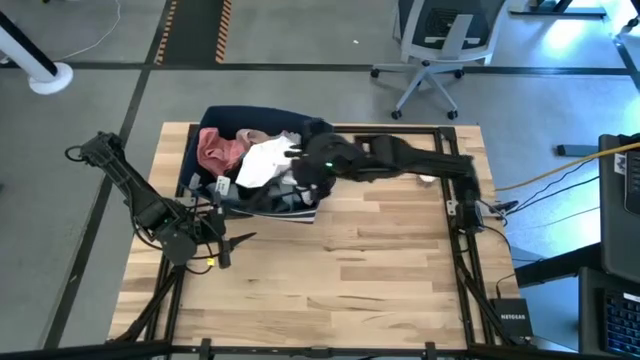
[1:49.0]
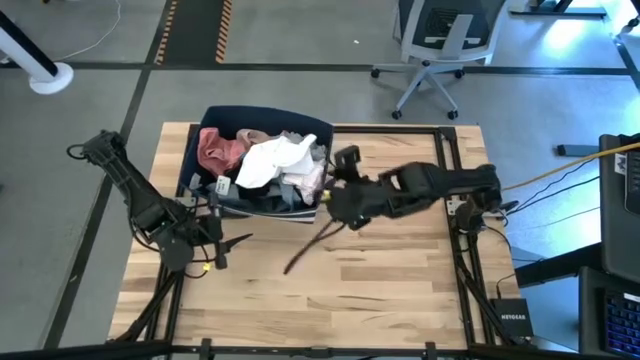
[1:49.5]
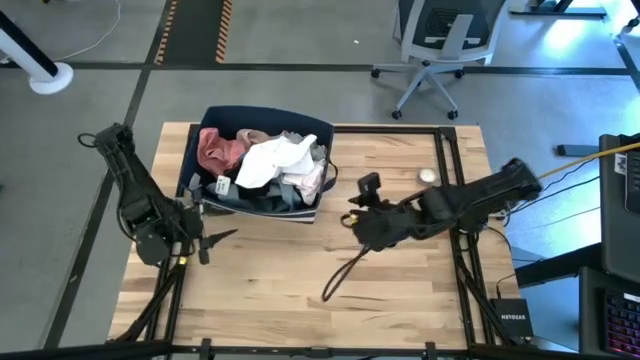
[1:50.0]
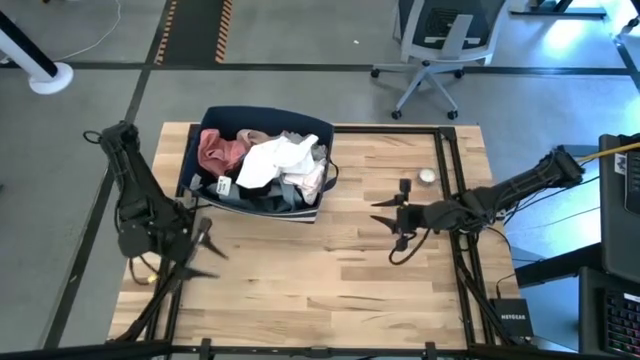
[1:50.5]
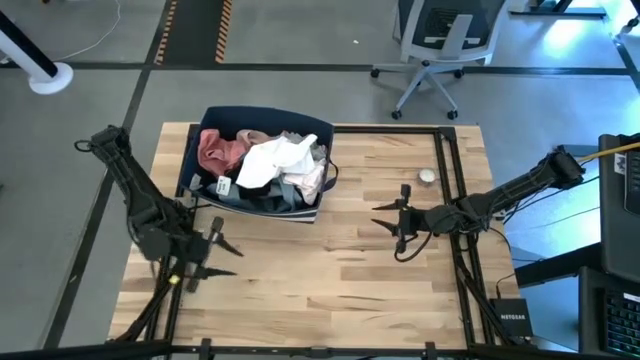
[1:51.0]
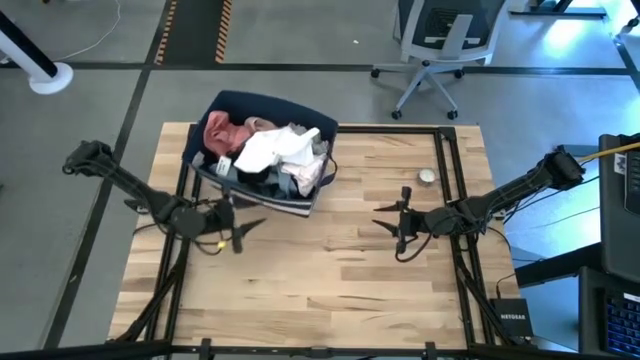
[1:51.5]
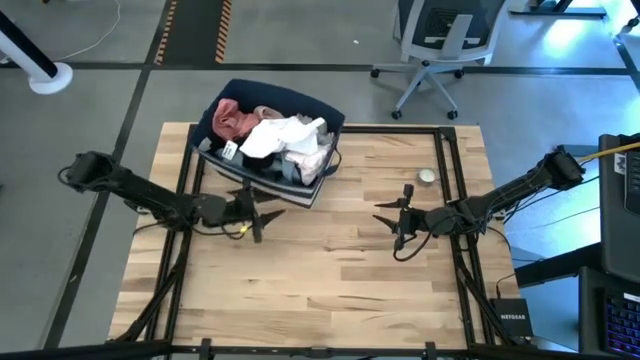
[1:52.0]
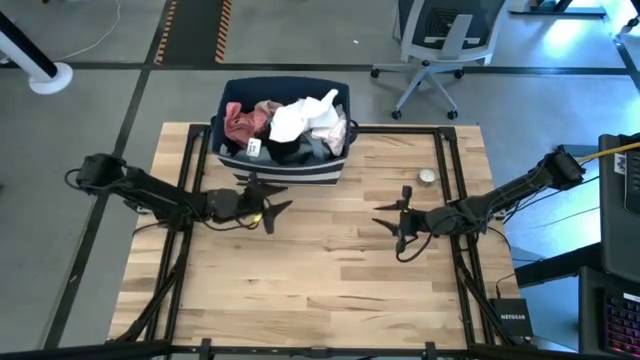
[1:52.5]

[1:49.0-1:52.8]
Task: Sort clothes
Move the blue laundry organizer to the top left

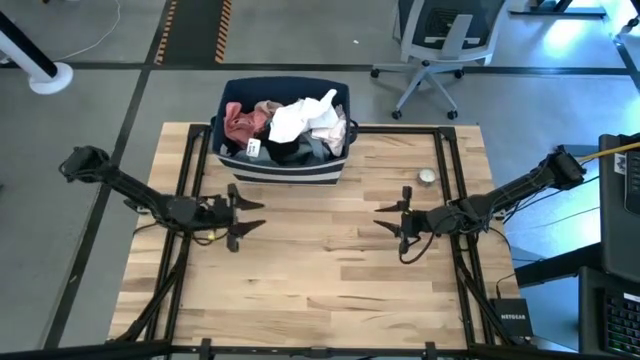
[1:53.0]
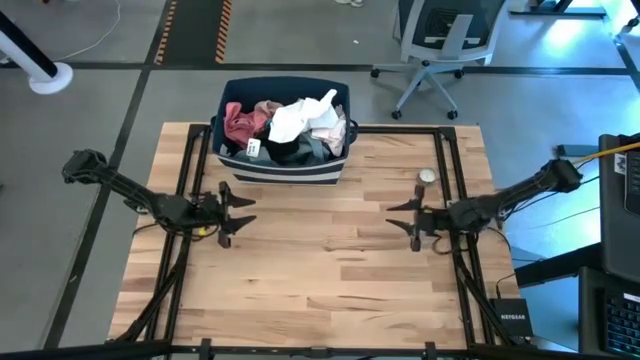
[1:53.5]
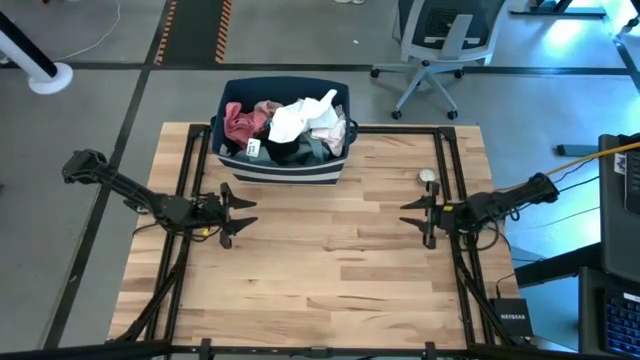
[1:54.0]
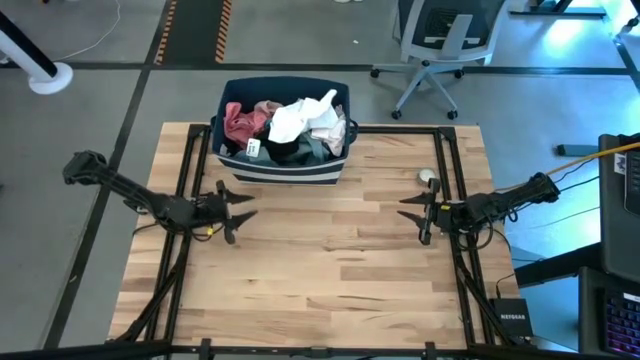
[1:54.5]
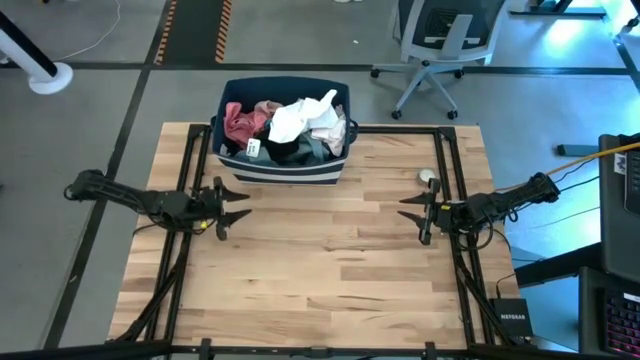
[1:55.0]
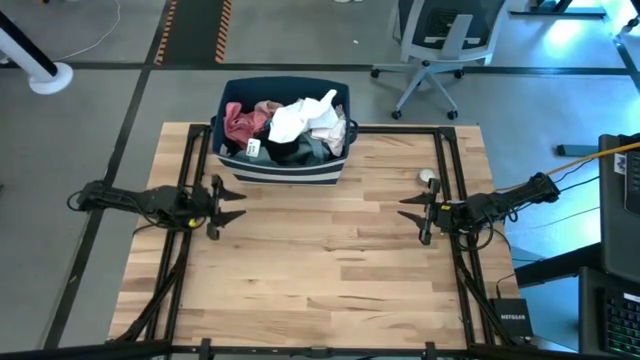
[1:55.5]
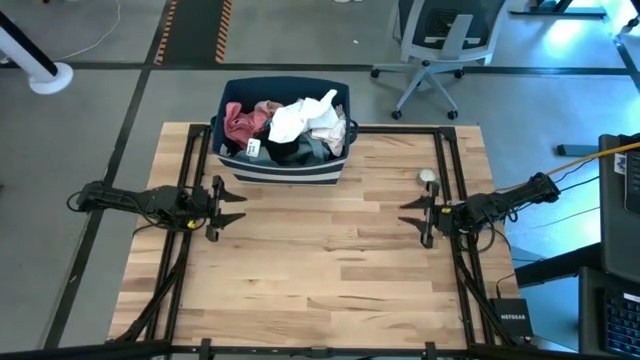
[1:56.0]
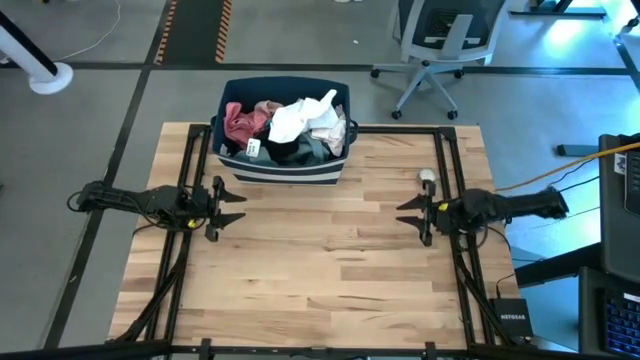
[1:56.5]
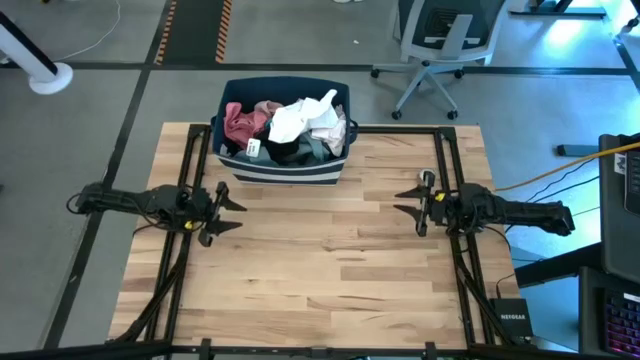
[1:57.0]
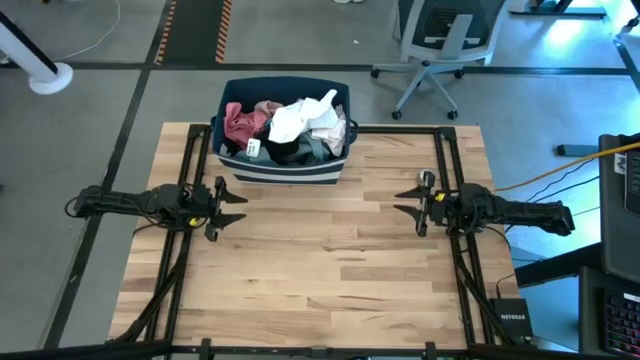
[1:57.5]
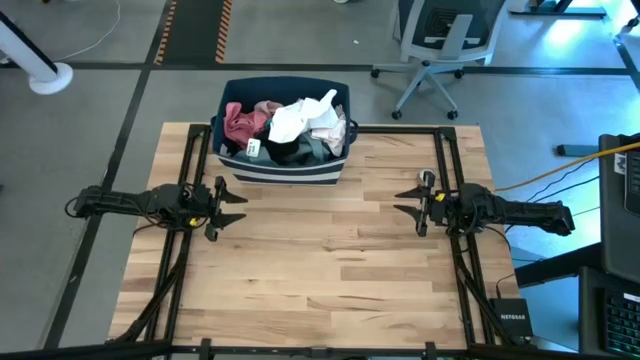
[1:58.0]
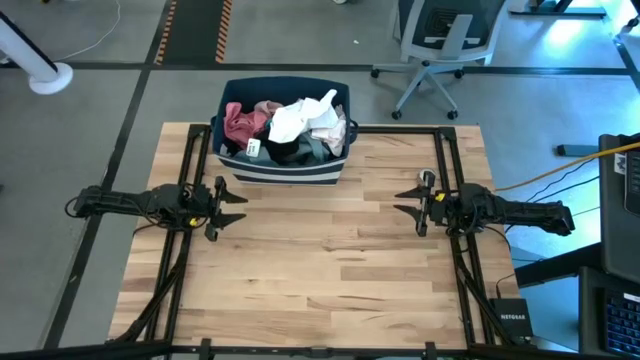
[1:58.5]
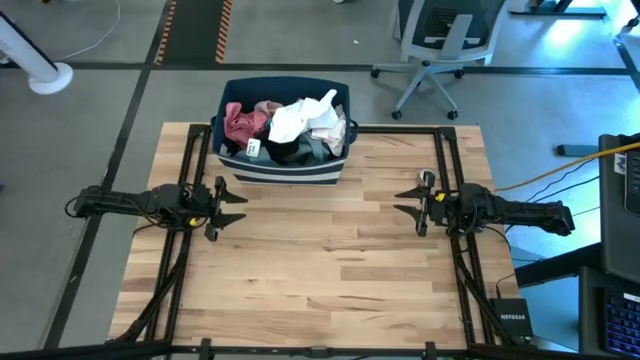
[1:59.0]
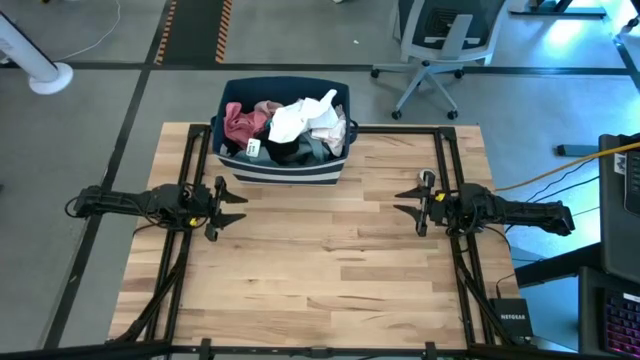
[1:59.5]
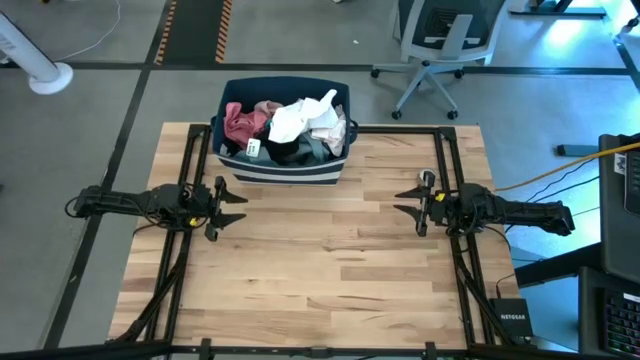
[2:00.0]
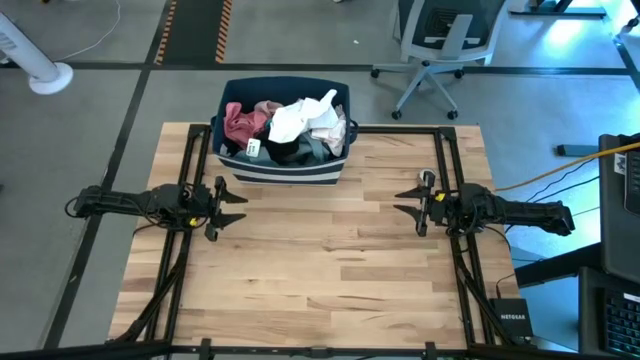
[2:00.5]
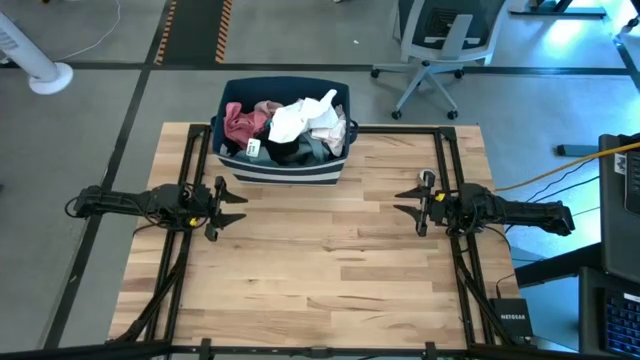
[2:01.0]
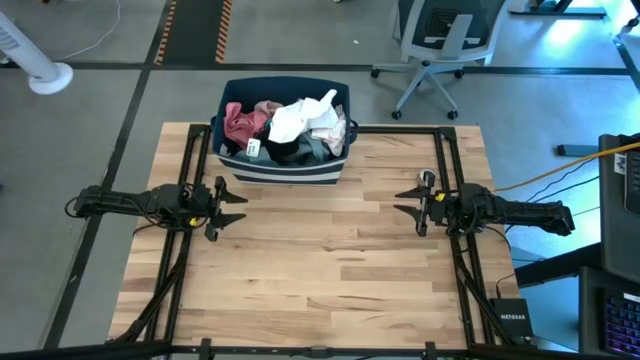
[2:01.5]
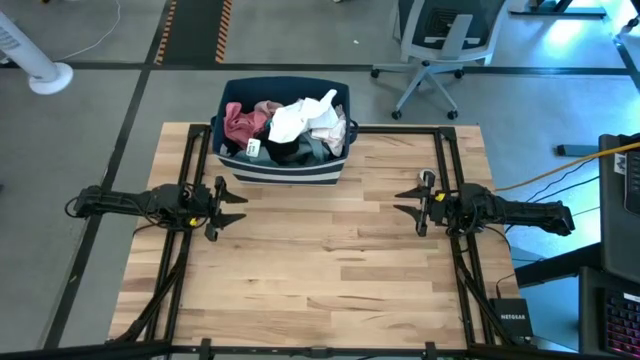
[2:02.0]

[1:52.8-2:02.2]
Return to Home Position

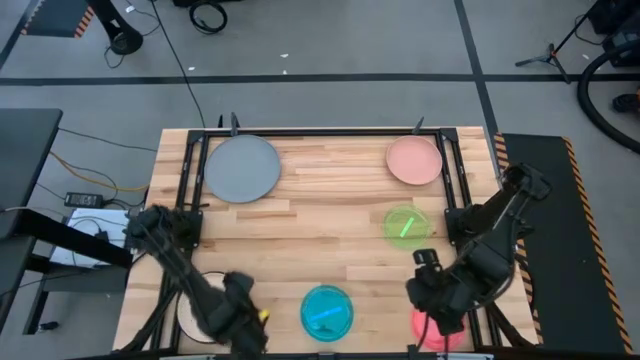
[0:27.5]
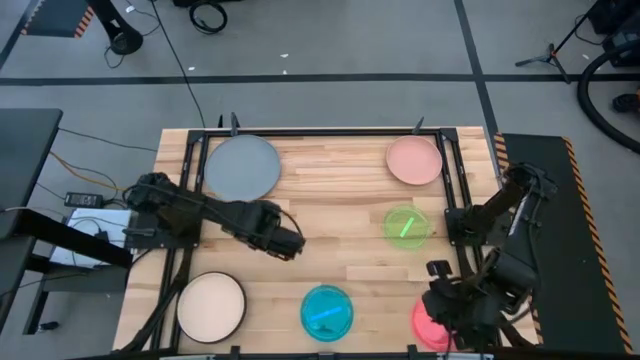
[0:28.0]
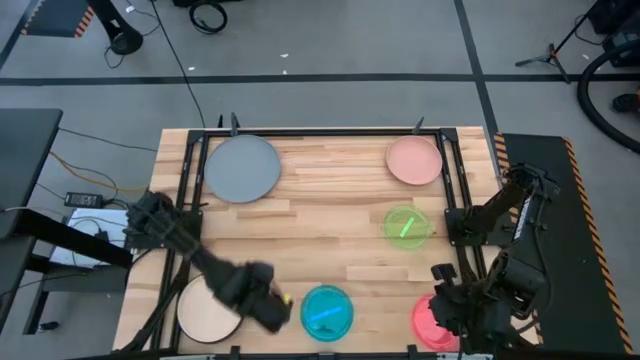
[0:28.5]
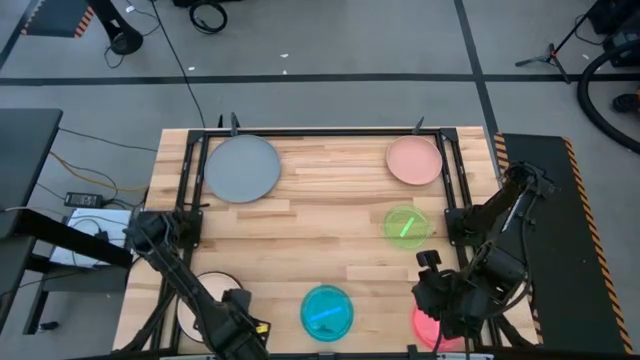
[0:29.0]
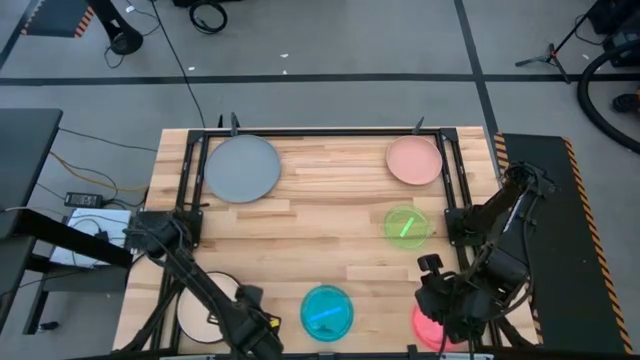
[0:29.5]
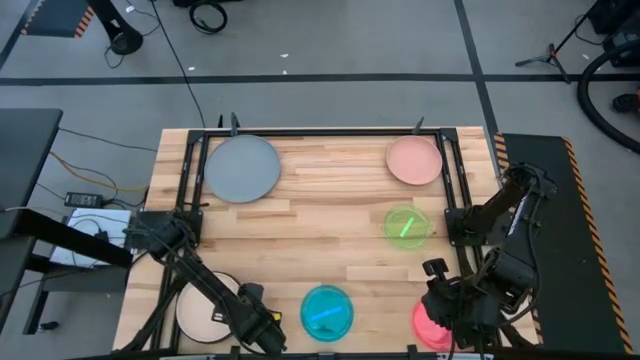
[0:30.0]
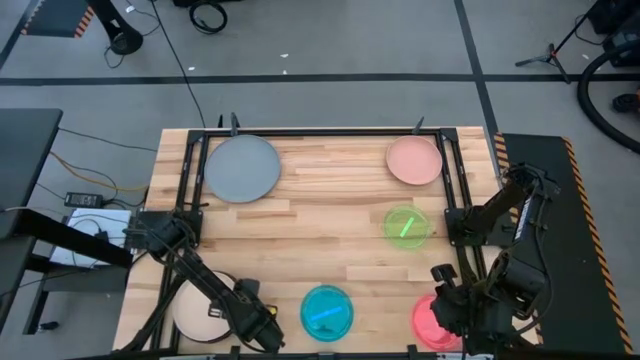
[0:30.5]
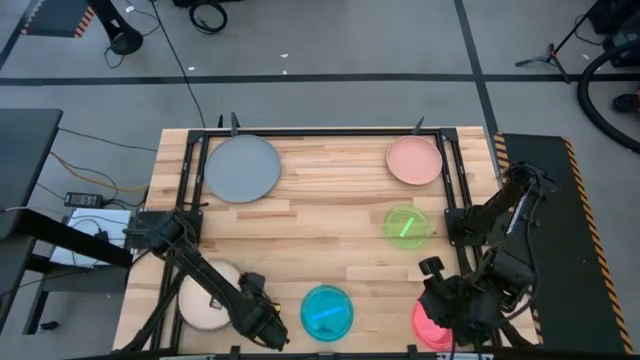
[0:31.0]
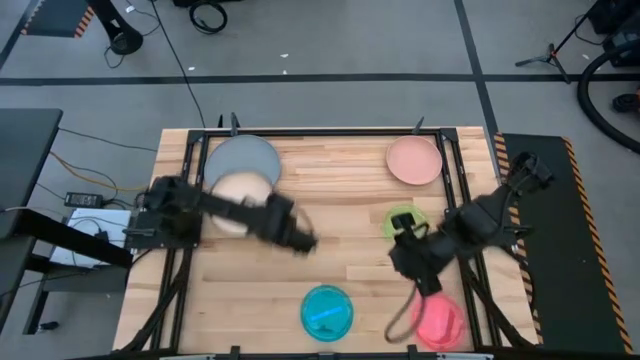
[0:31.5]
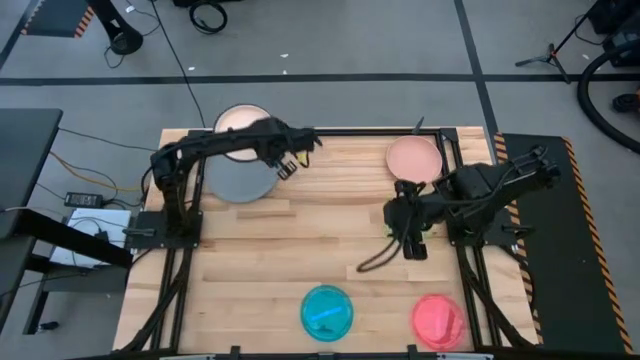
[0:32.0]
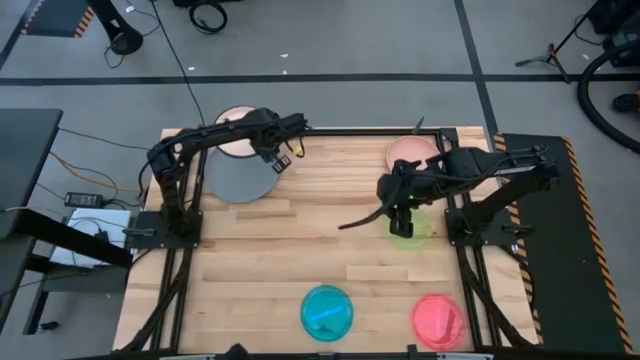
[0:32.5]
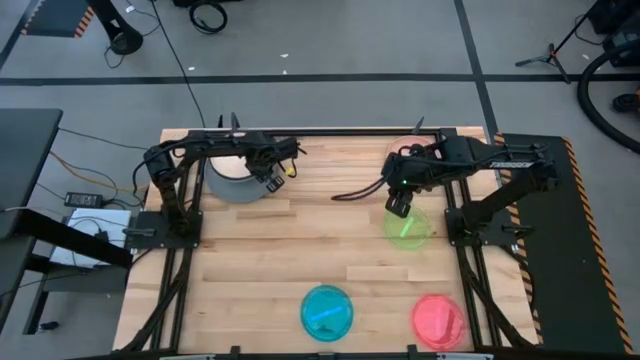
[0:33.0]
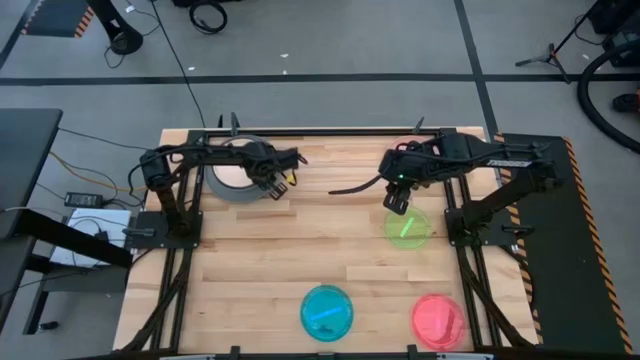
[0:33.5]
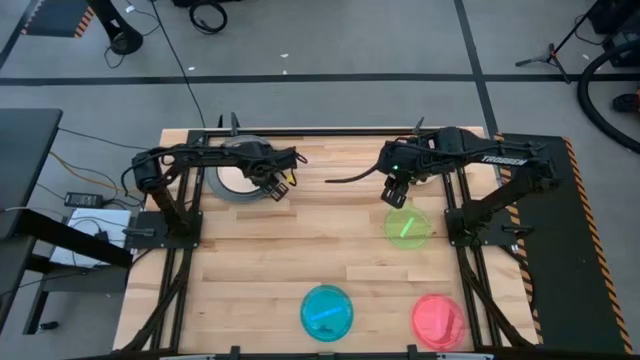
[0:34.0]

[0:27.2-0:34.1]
Task: Stack plastic plates
Stack the stacked plates on the gray plate
